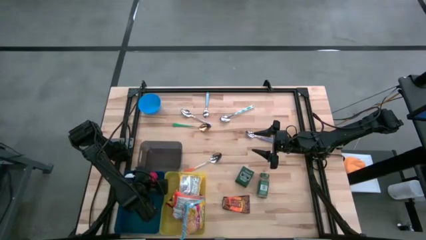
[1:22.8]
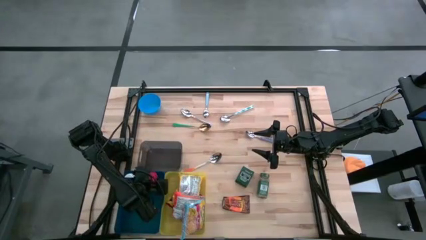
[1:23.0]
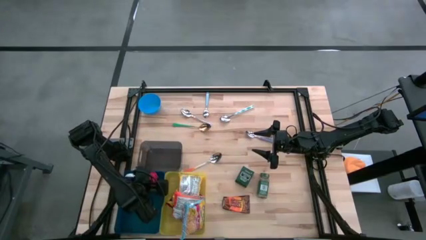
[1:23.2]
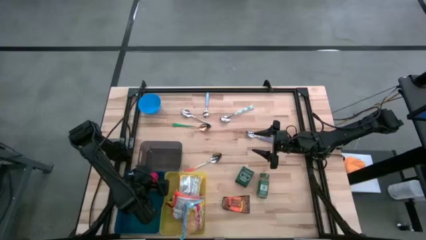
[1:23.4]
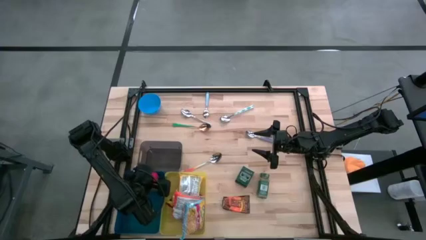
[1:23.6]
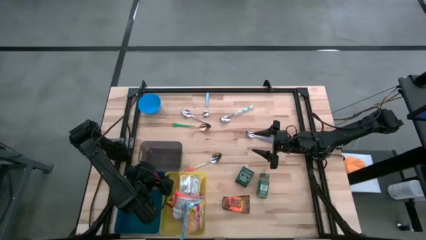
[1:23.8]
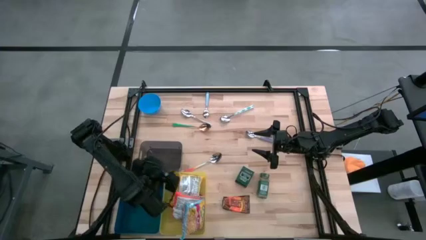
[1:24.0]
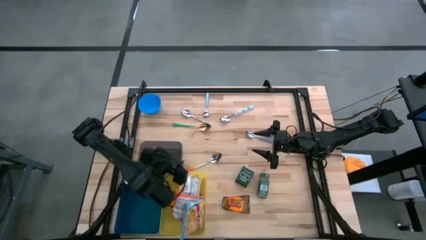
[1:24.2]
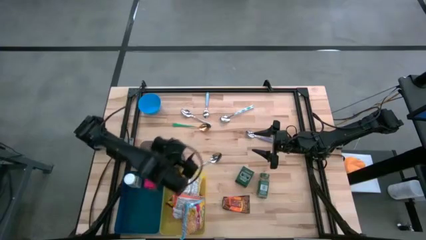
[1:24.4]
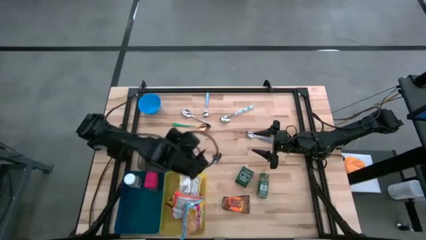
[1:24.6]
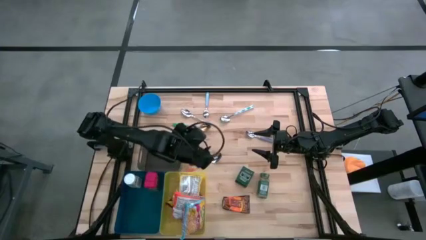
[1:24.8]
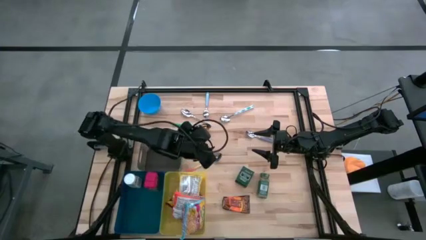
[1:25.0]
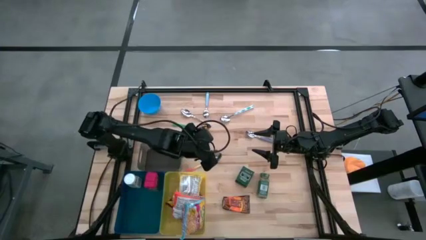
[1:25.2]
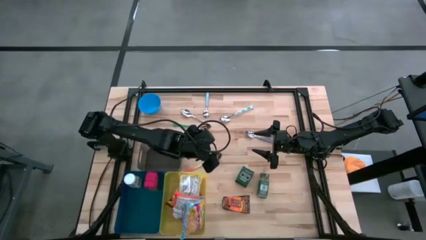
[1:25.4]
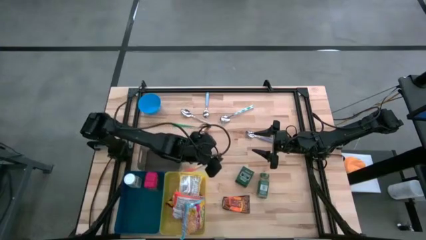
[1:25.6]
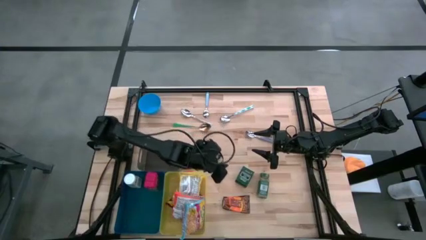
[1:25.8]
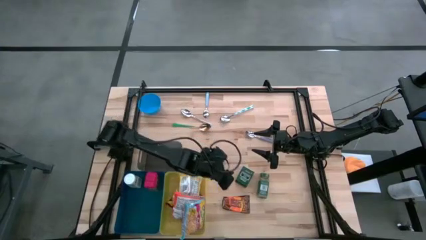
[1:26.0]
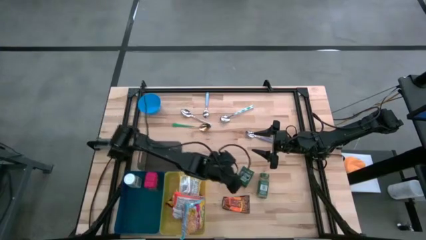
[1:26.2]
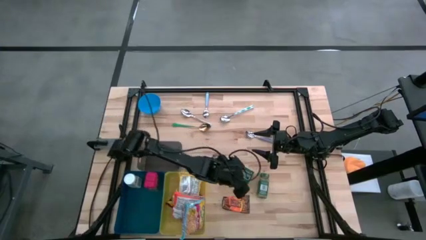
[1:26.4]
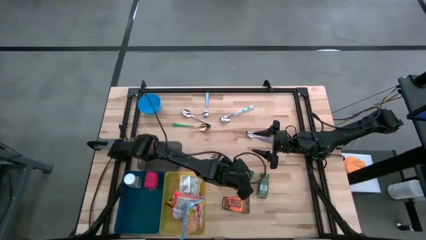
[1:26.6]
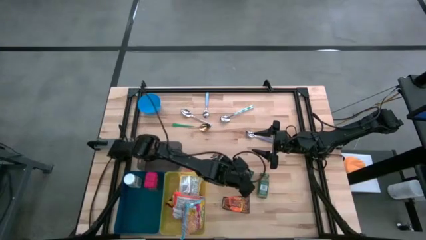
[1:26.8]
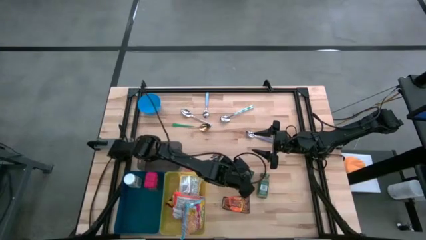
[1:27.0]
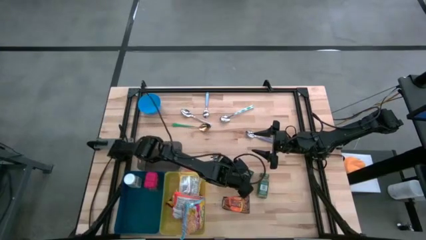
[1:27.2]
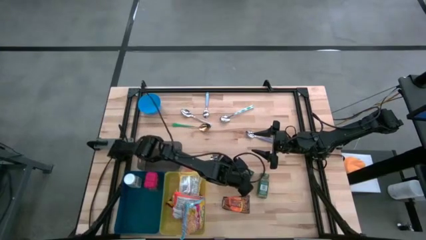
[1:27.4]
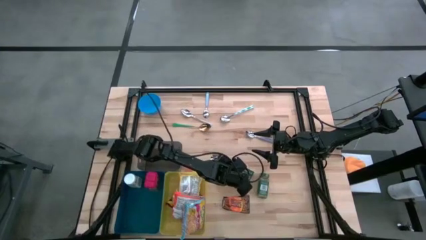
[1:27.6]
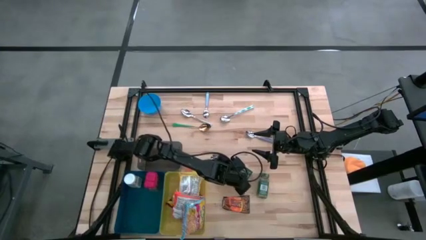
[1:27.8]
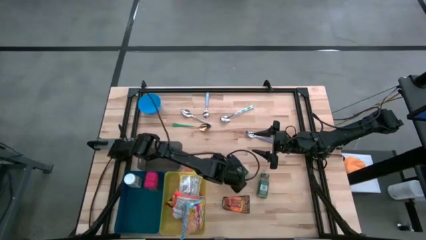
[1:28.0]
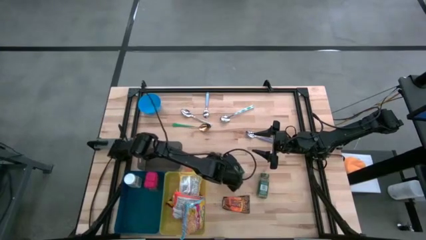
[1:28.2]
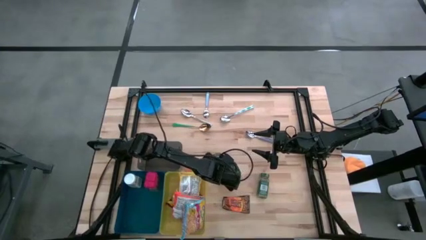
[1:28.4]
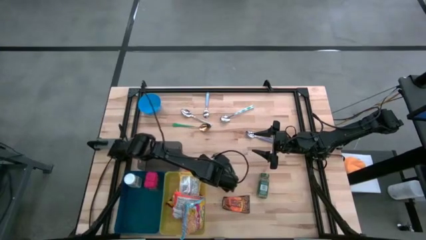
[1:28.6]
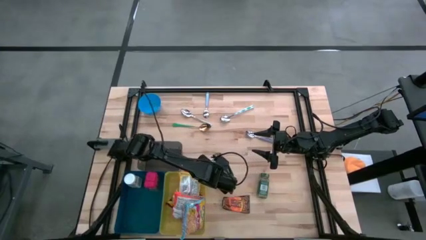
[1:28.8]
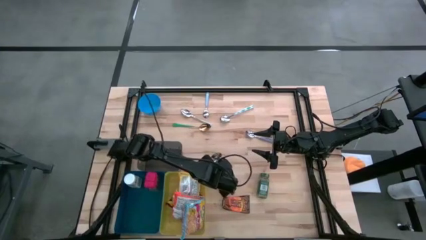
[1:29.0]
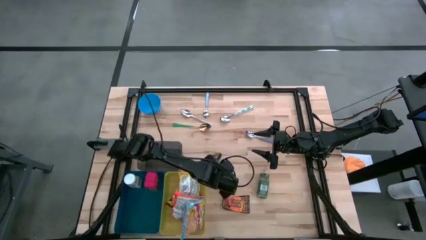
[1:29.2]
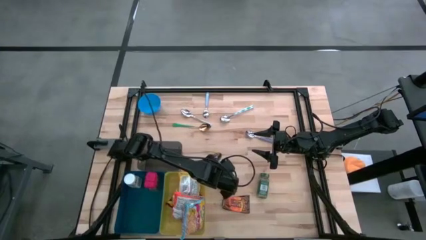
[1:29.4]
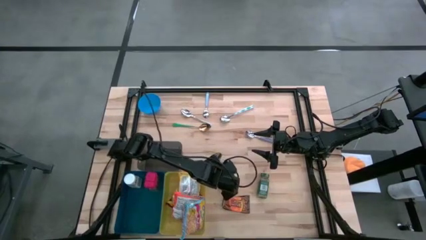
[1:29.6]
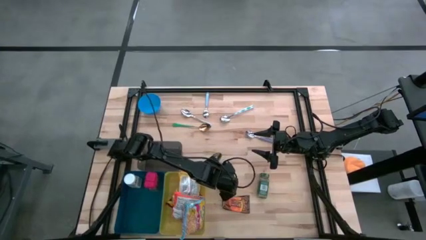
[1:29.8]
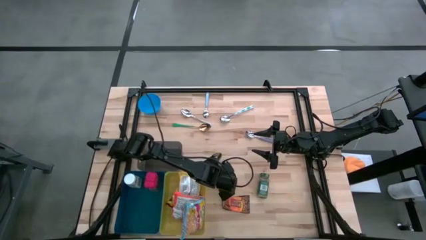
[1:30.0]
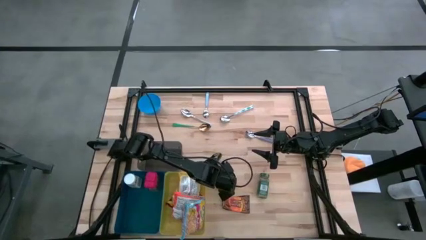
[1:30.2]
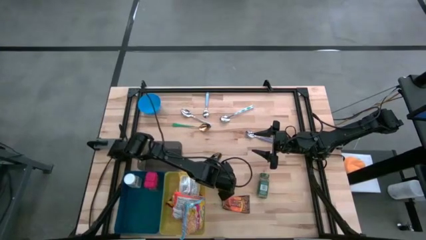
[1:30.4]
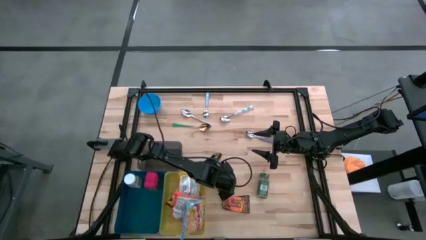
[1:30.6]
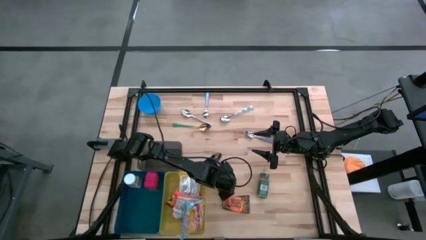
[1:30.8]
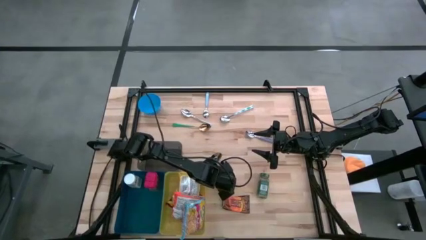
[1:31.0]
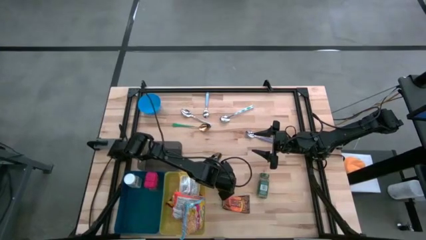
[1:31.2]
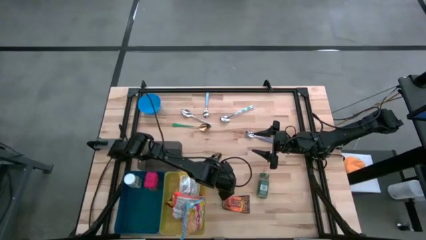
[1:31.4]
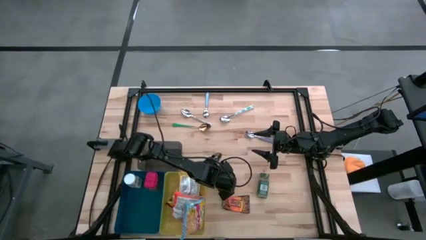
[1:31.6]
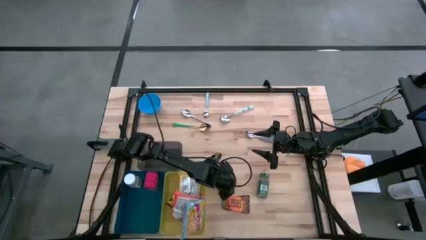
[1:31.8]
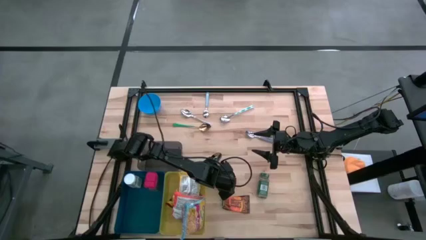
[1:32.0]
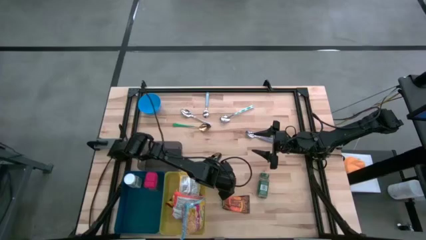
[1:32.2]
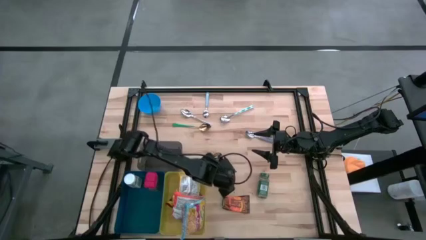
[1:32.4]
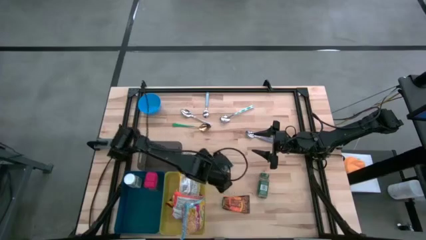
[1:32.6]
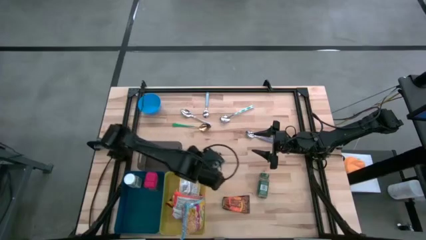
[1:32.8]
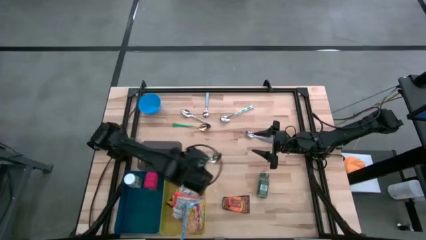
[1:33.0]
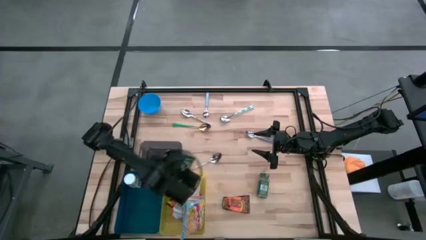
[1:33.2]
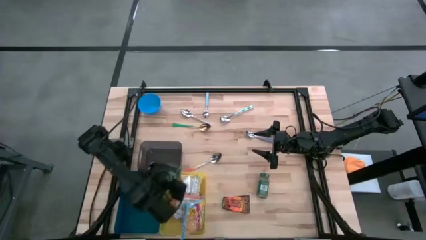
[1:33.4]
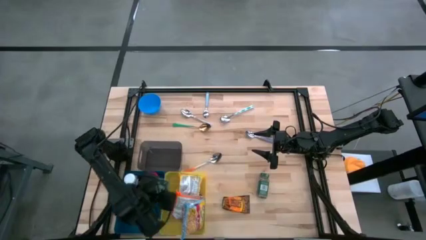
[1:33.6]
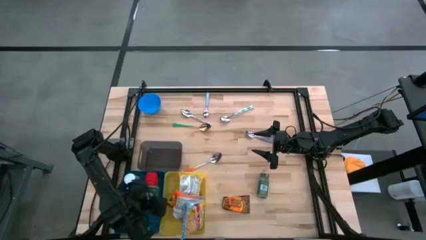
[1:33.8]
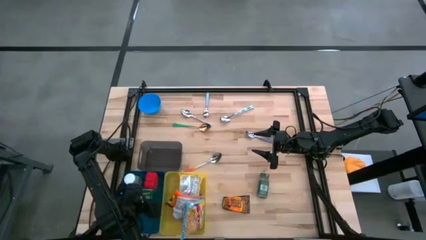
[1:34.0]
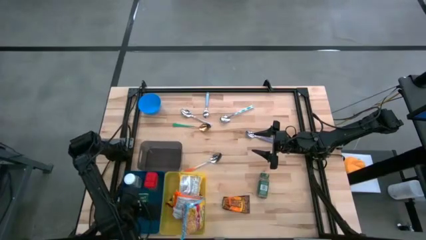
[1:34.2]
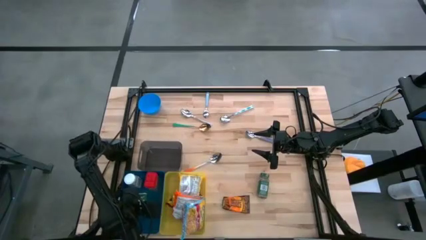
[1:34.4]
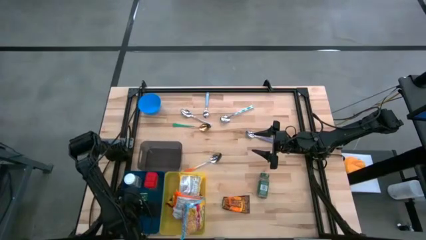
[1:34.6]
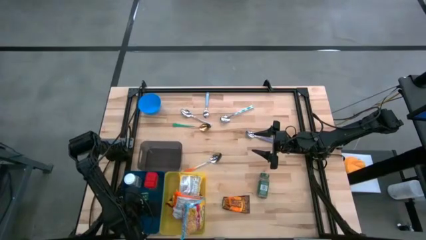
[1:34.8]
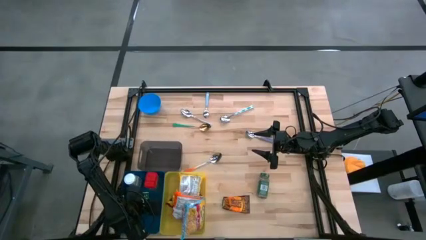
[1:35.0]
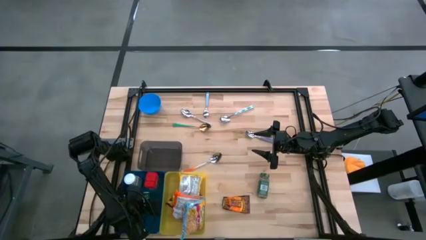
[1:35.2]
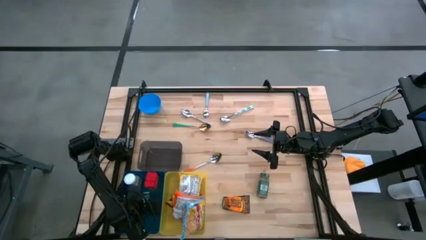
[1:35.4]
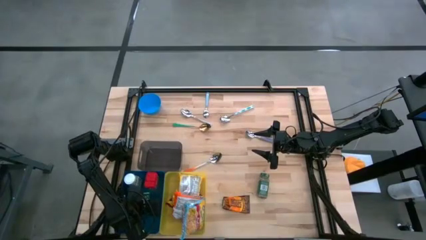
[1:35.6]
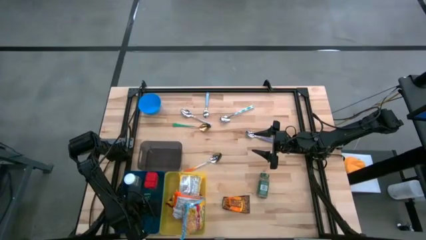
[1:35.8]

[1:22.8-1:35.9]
Put the green seasoning can into the blue bin

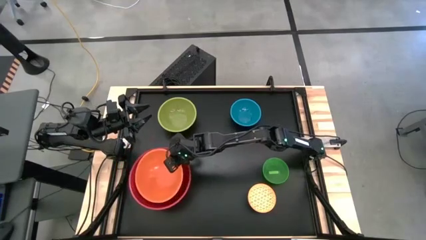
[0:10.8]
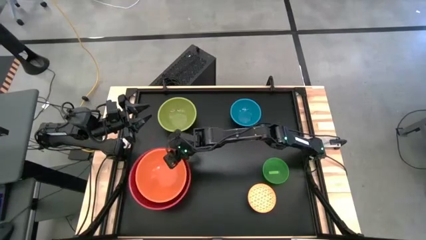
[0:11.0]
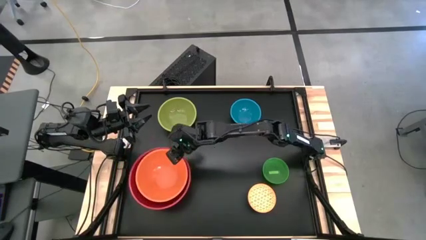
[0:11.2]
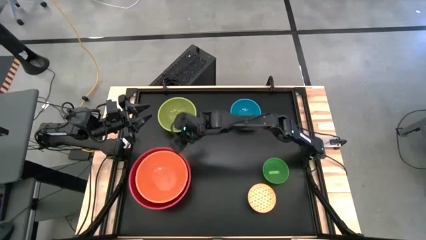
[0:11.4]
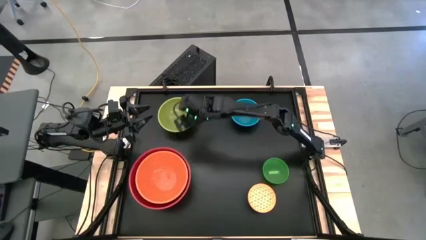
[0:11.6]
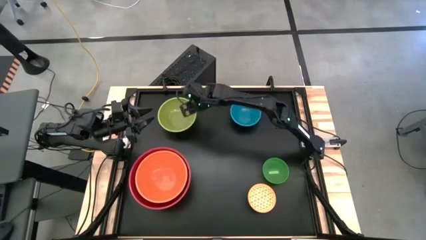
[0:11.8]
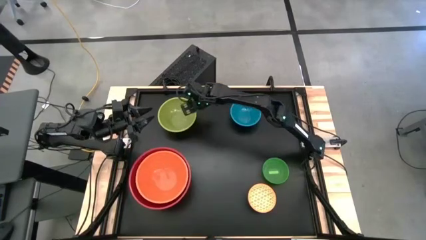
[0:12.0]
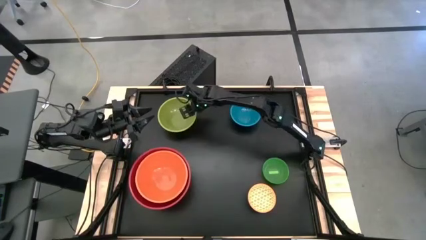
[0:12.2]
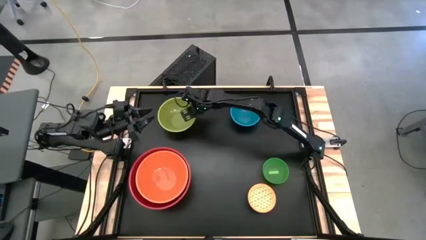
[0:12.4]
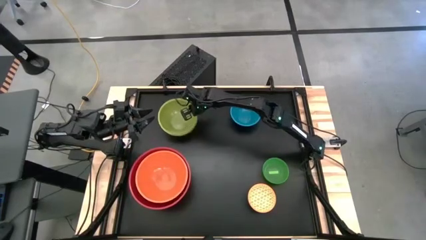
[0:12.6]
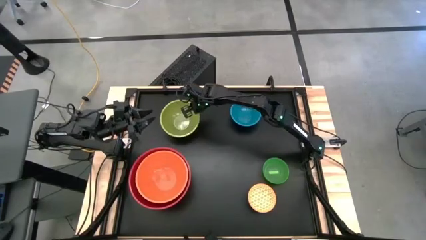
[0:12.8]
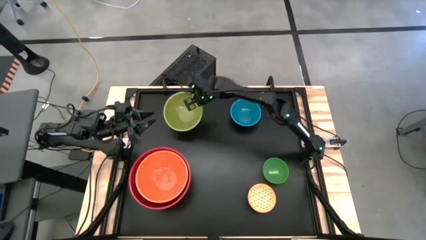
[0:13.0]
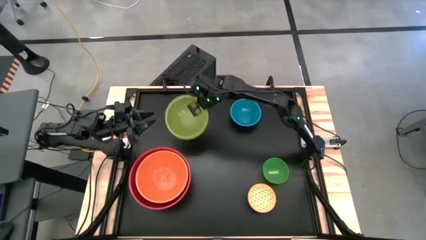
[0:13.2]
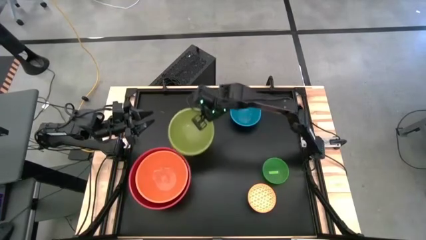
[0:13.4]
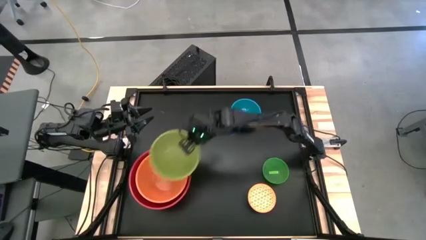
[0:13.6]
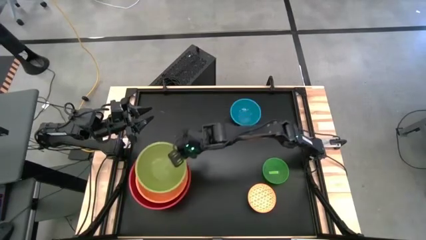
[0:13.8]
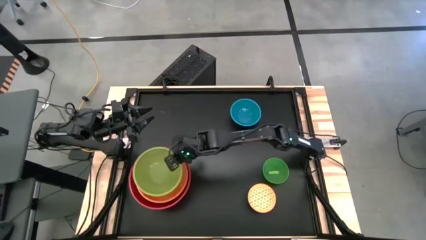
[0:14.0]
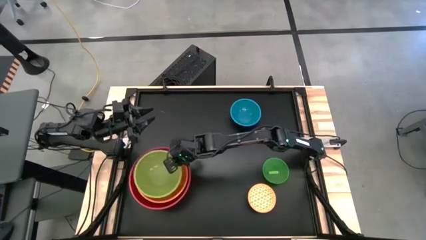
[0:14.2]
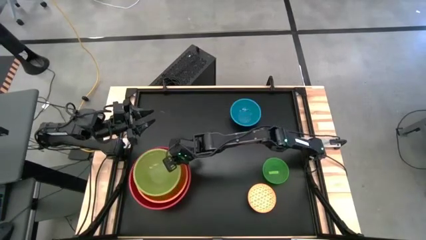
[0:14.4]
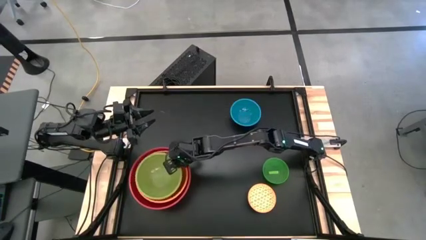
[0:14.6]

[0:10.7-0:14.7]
Stack the green bowl into the orange bowl
